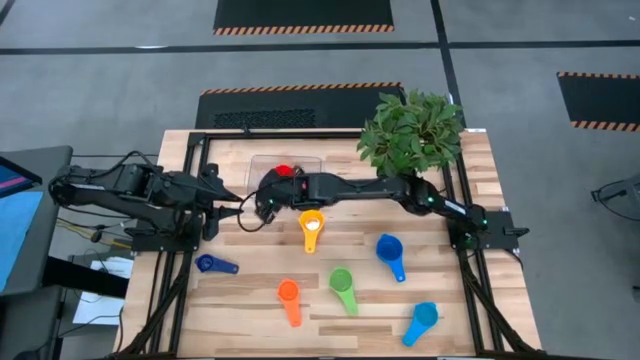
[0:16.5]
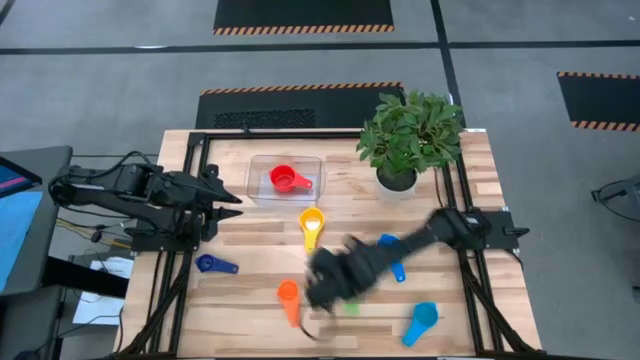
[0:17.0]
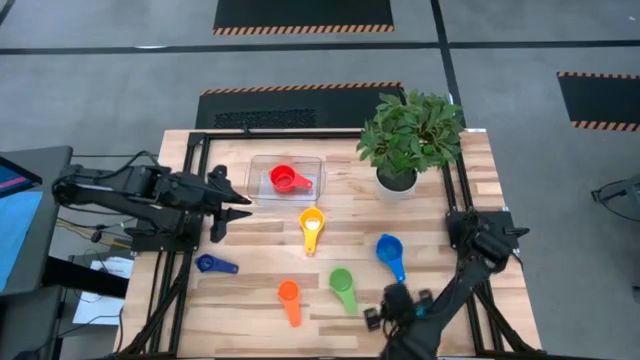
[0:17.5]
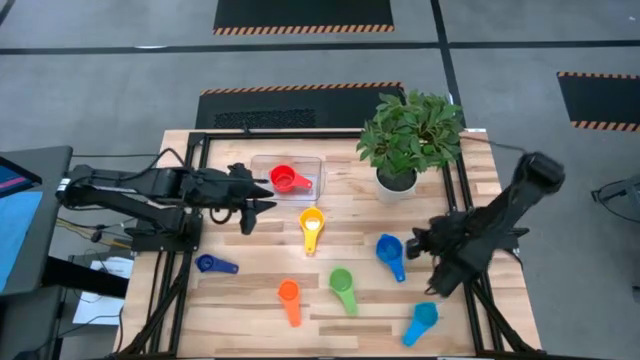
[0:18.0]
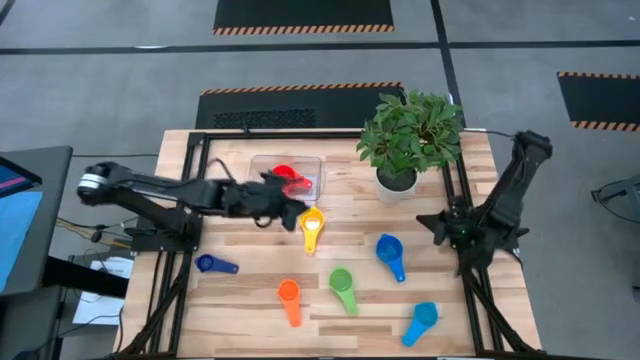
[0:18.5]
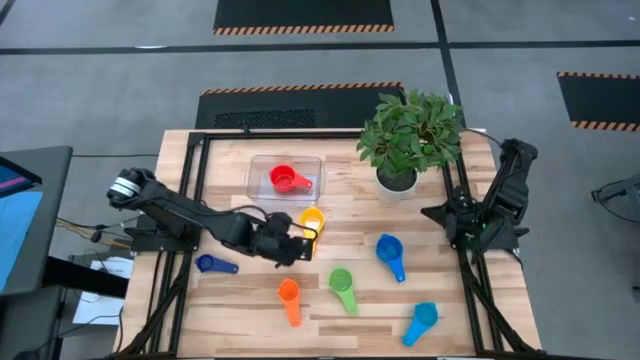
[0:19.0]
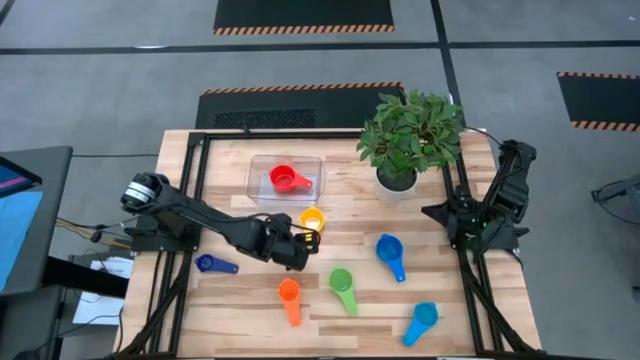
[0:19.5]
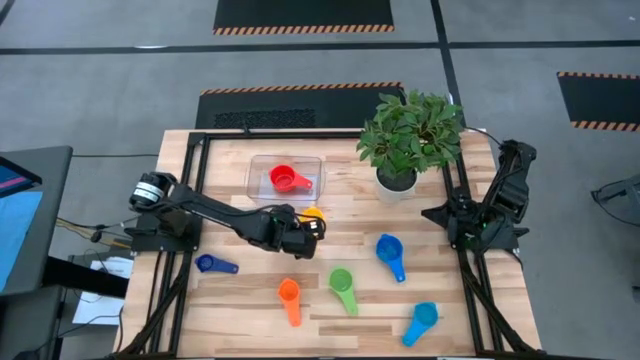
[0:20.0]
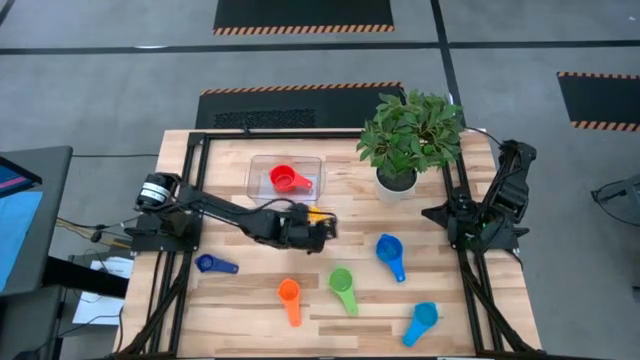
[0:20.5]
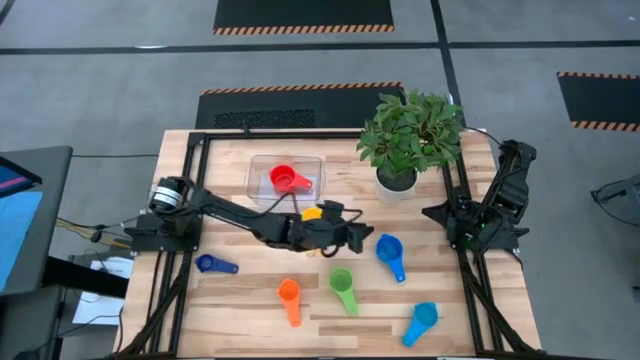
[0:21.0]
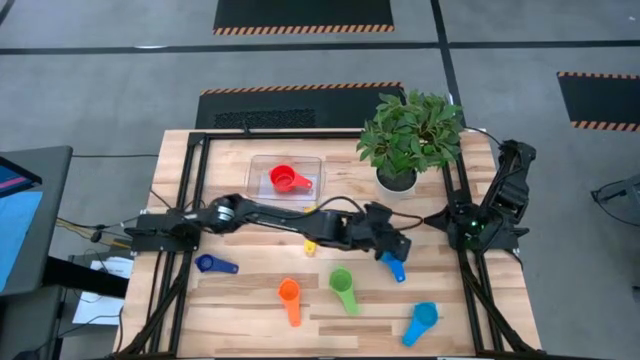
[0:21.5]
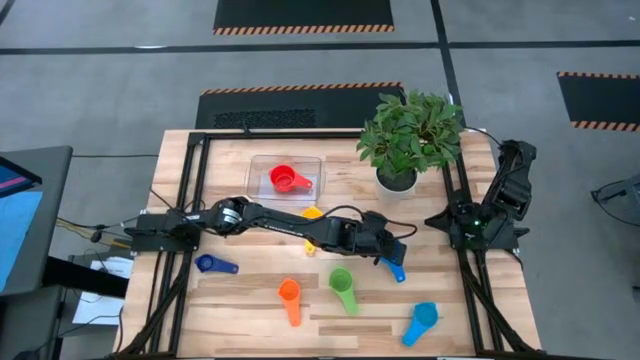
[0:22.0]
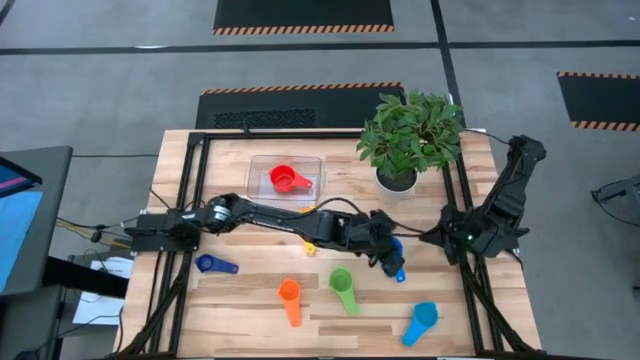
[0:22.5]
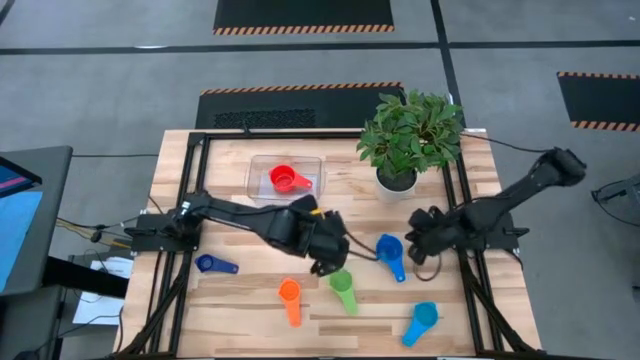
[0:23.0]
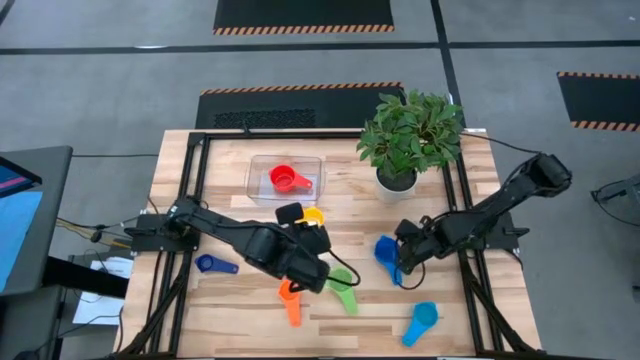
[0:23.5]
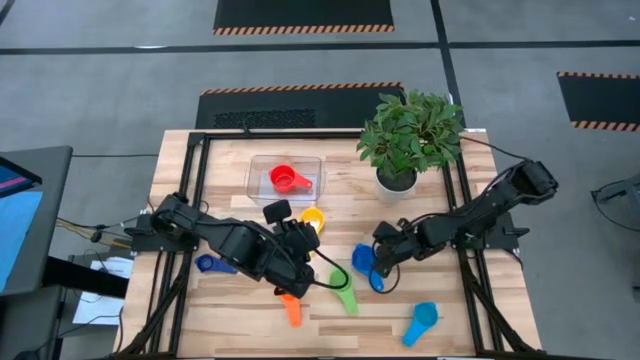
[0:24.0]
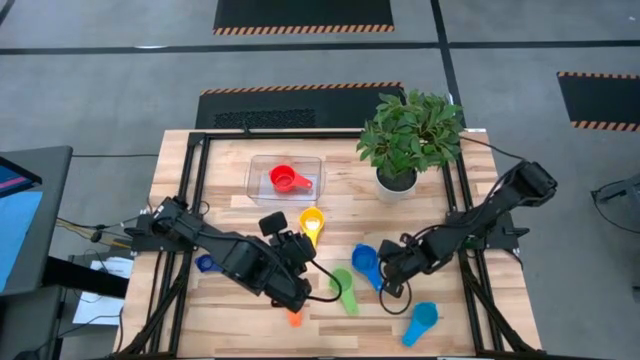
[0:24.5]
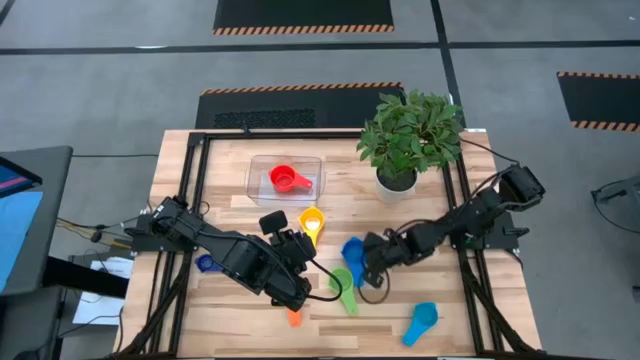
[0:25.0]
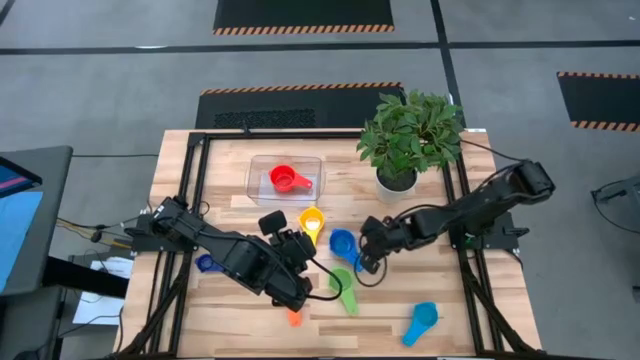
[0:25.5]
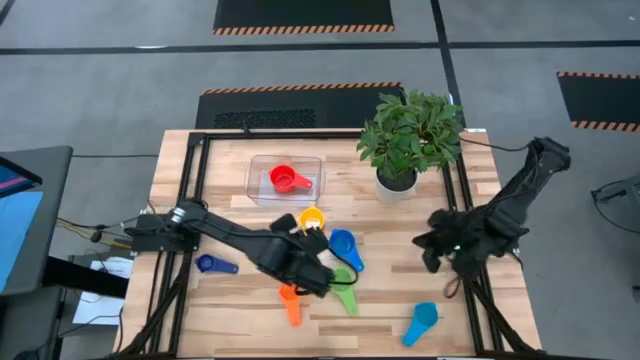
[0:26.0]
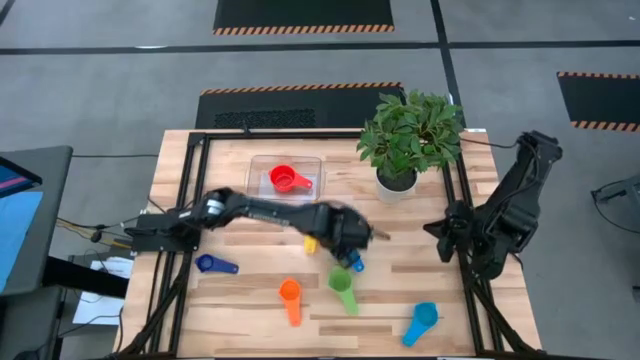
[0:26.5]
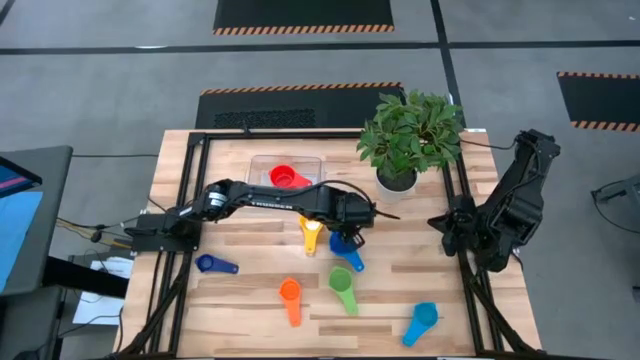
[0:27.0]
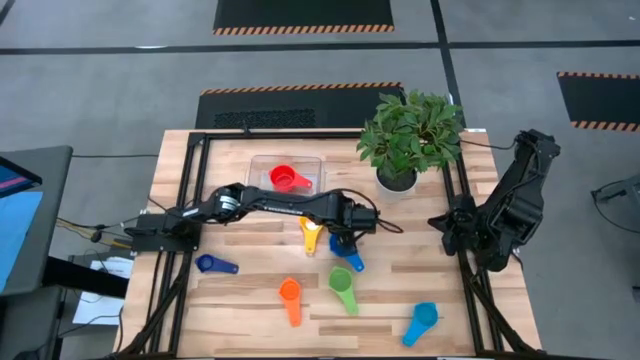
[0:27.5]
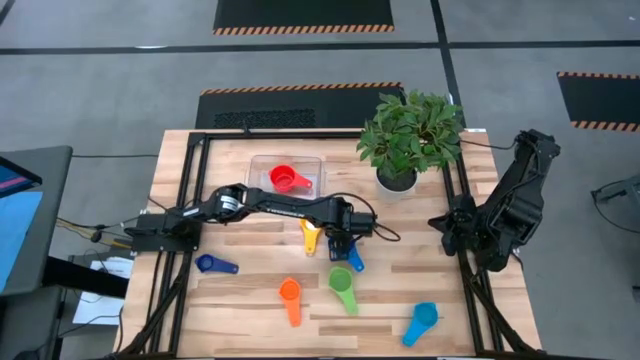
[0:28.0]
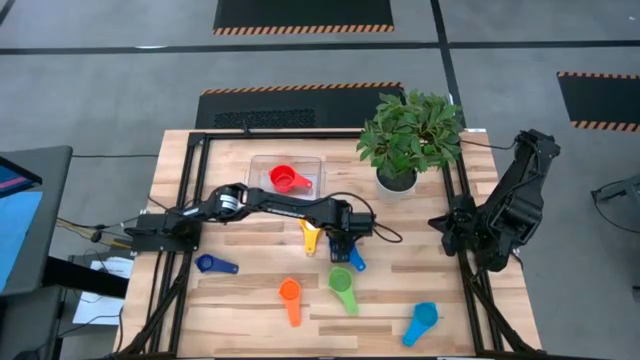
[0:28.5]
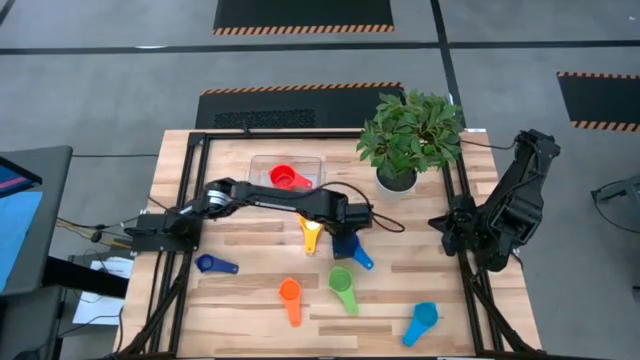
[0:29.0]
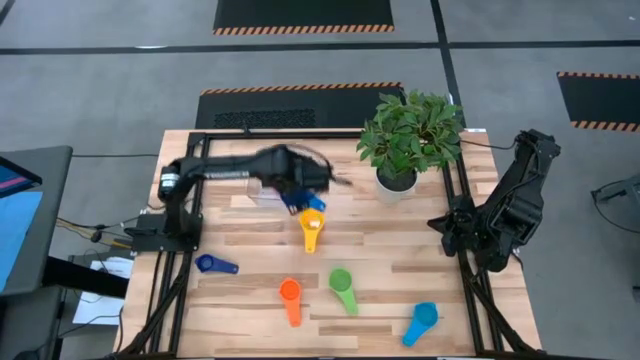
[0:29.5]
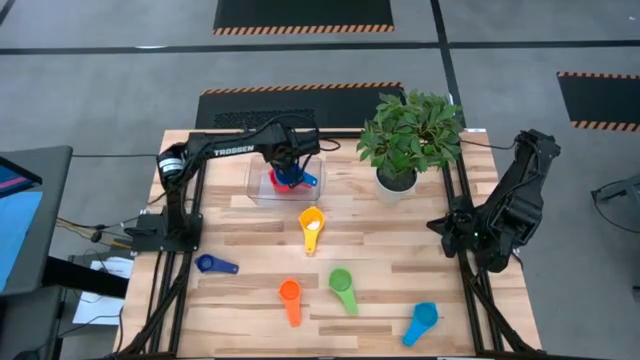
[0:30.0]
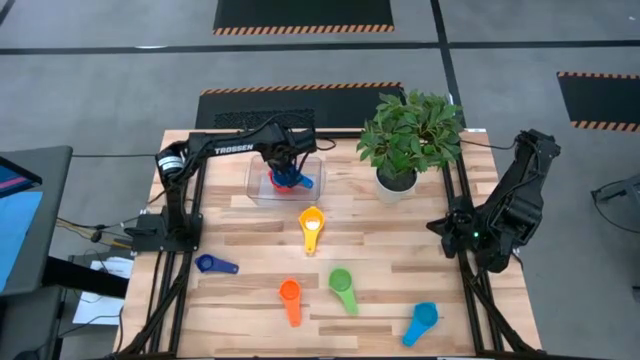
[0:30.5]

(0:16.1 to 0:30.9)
Task: Nest measuring cups in basket
Stack the blue measuring cup on top of the red measuring cup in the transparent bin

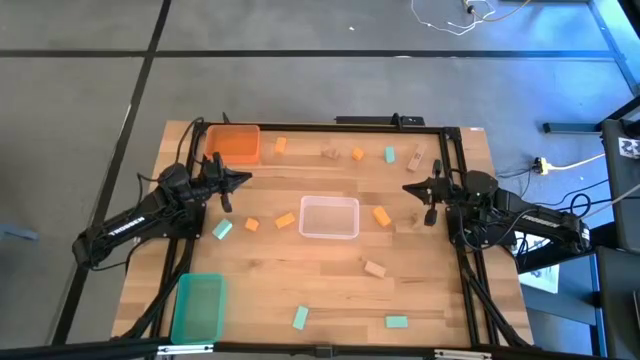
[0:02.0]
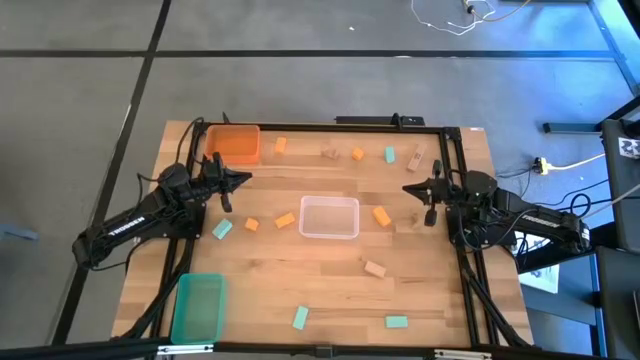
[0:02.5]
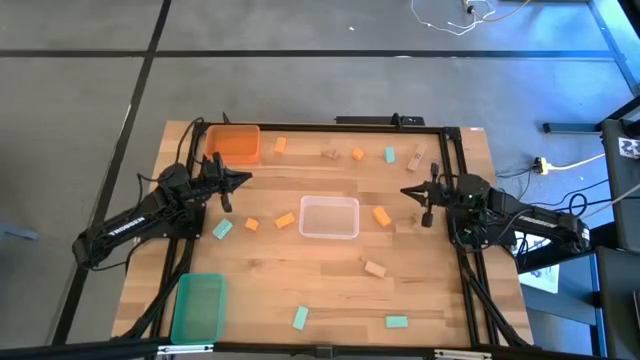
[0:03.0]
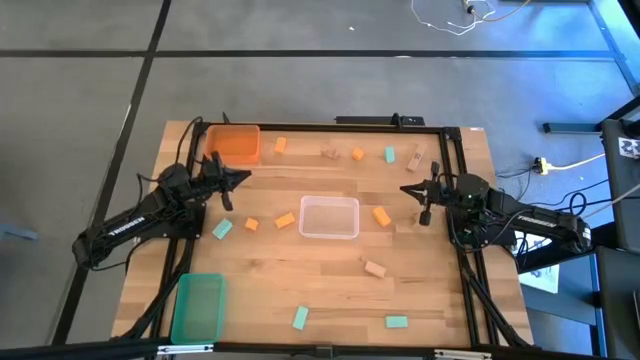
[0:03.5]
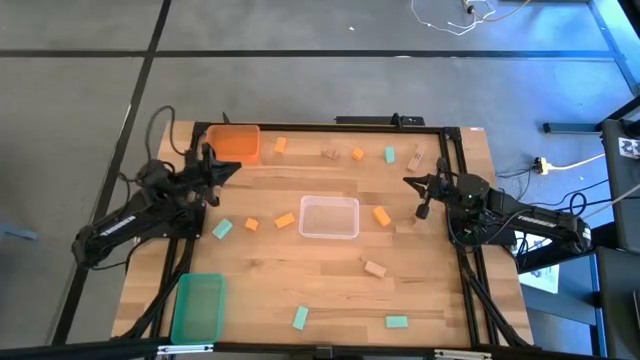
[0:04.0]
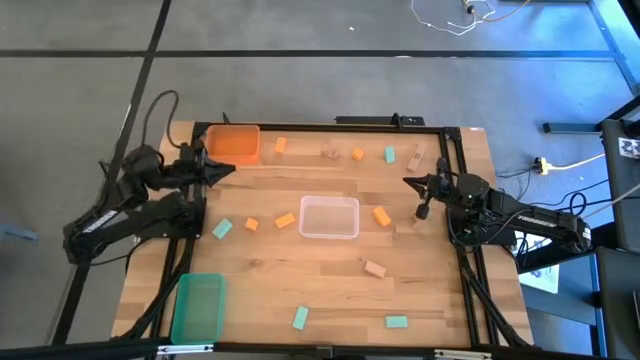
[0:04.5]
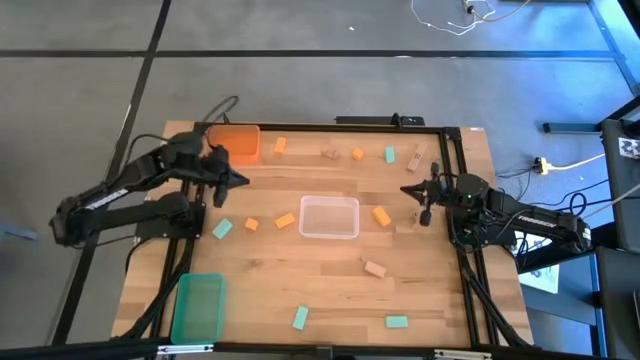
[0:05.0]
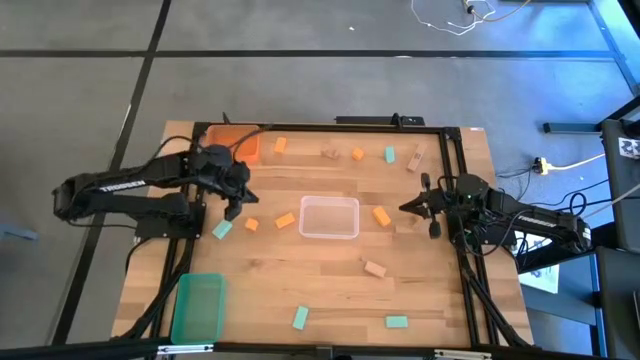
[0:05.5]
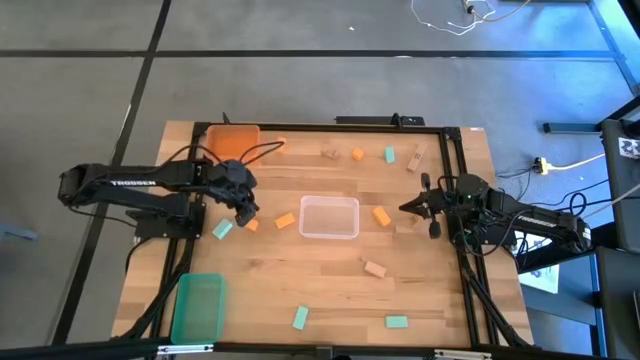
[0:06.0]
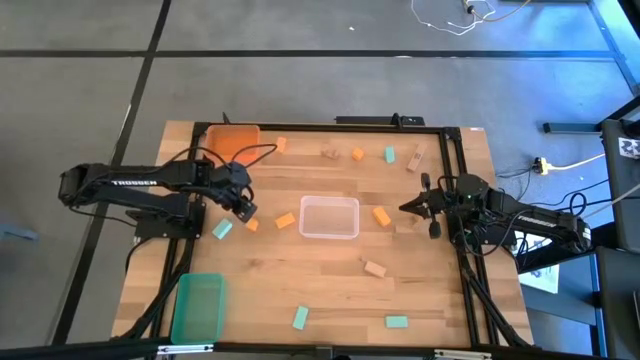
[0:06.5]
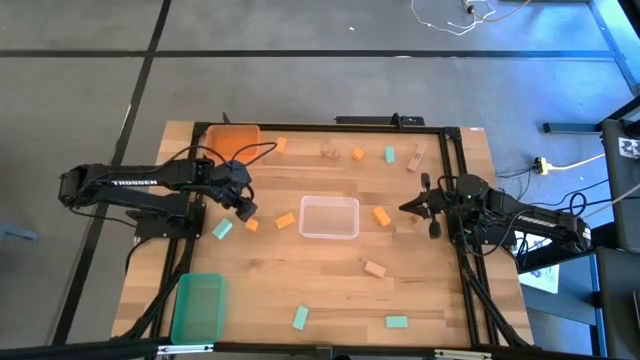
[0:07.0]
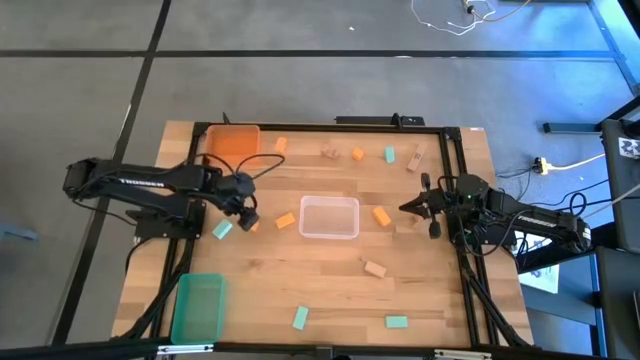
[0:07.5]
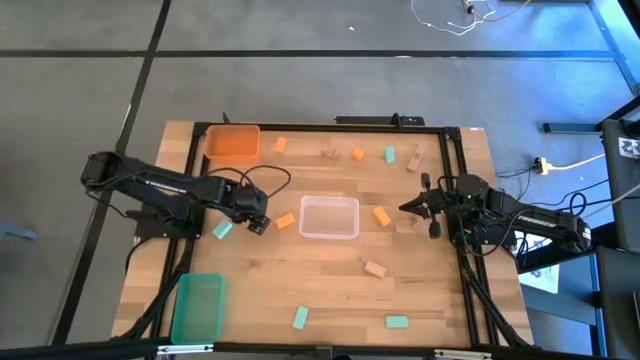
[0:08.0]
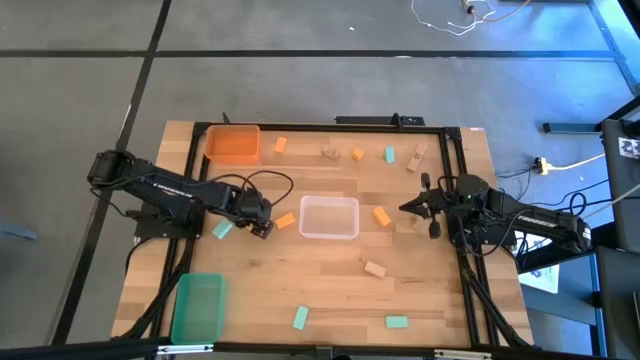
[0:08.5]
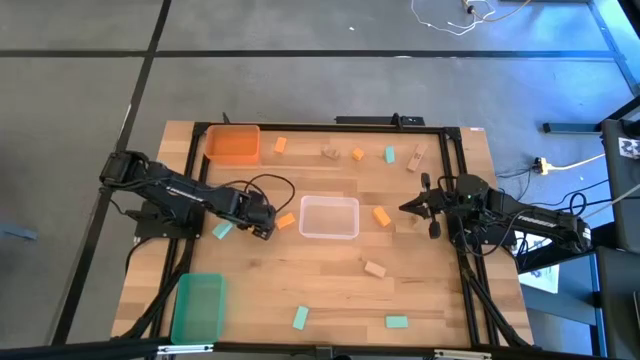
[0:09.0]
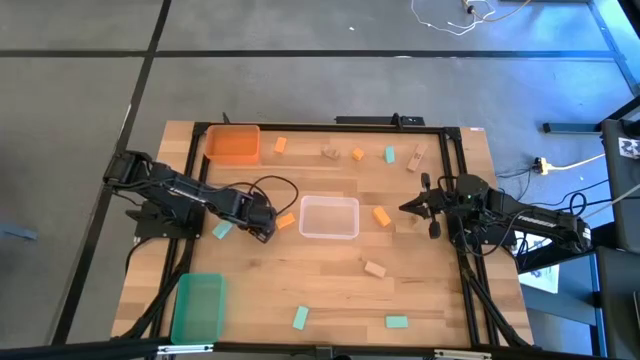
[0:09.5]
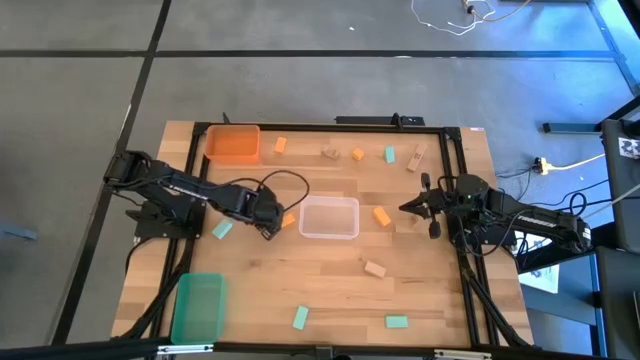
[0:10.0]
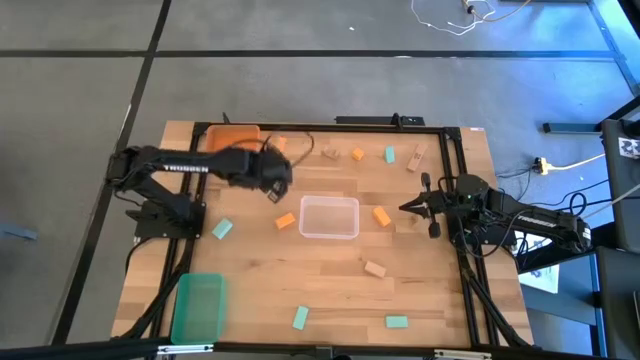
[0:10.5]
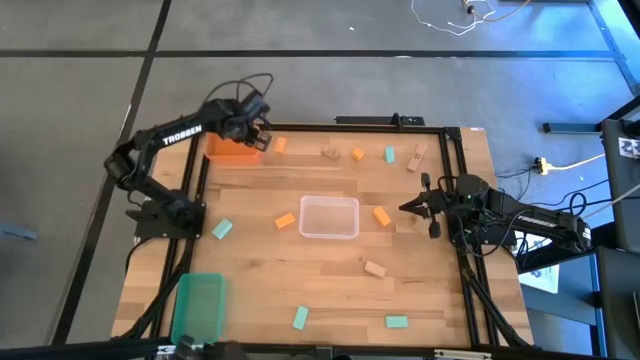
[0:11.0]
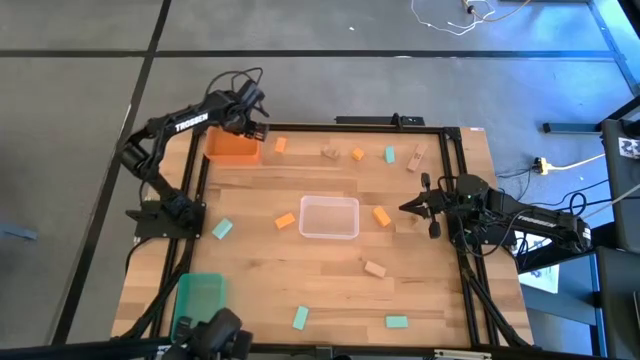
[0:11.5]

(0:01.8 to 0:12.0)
Task: Sort & place blocks by color
Put the yellow into the orange bin
